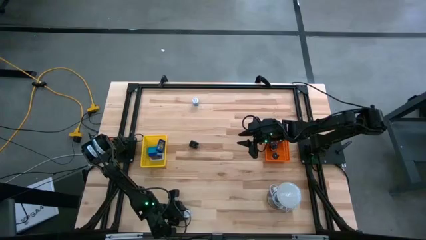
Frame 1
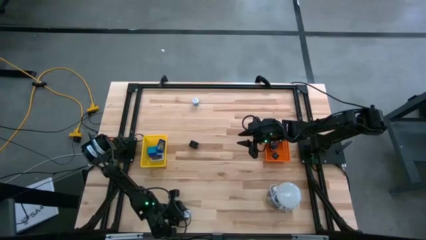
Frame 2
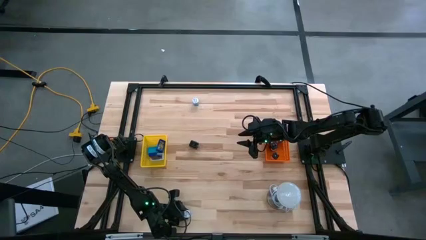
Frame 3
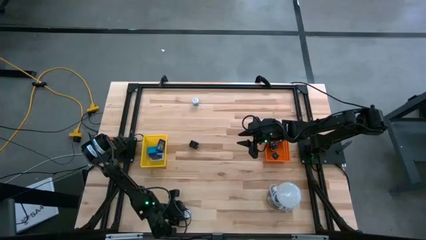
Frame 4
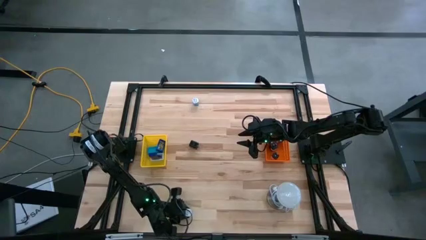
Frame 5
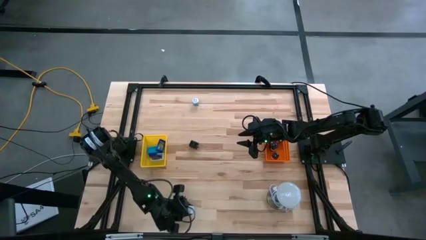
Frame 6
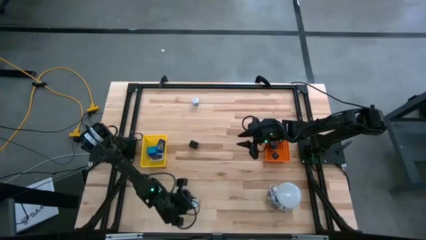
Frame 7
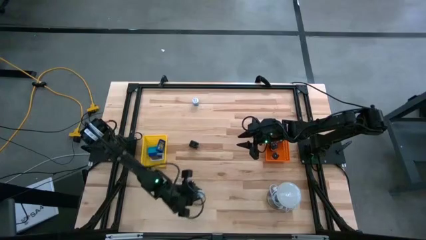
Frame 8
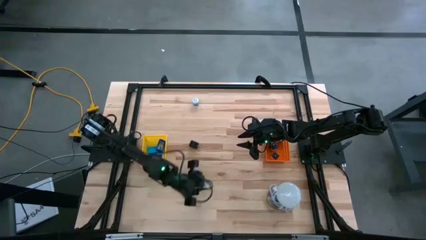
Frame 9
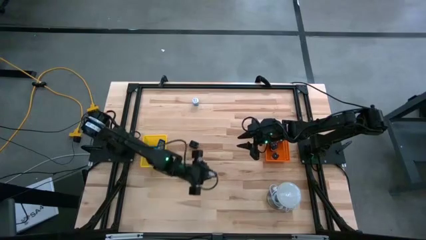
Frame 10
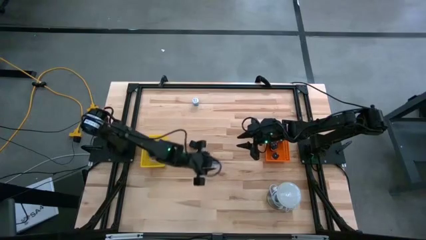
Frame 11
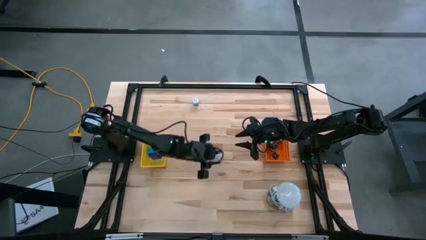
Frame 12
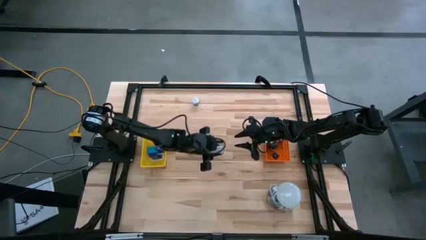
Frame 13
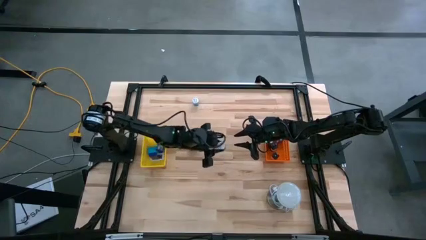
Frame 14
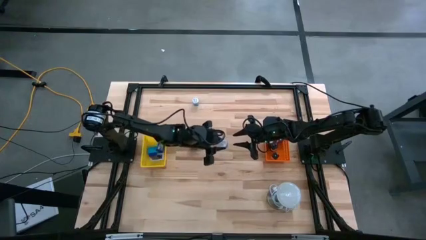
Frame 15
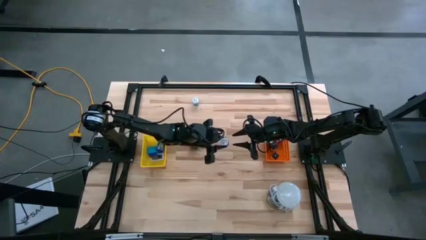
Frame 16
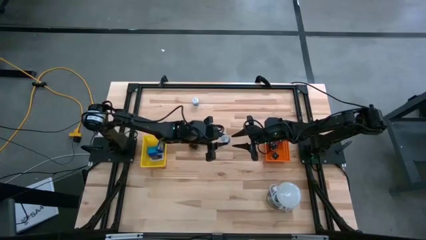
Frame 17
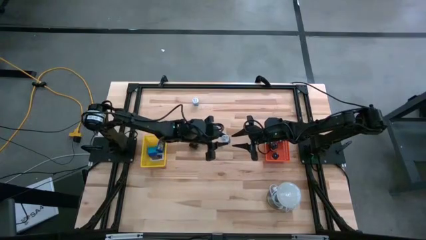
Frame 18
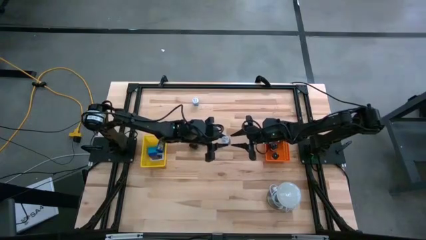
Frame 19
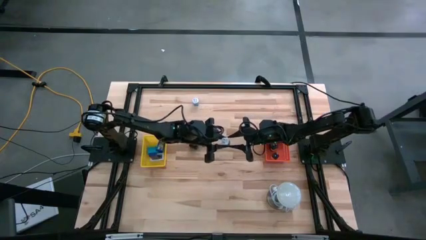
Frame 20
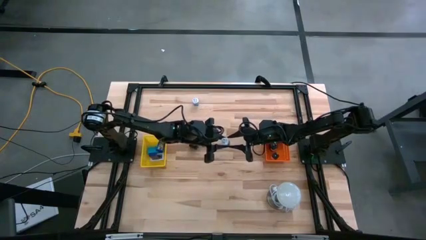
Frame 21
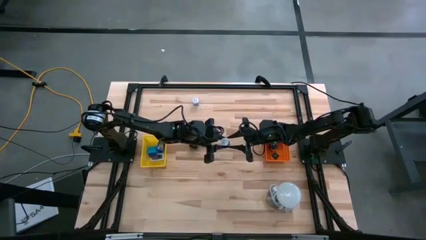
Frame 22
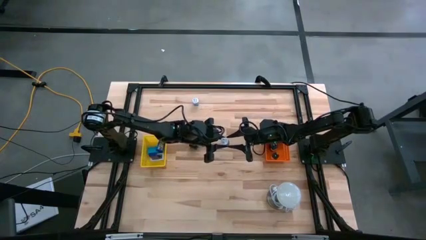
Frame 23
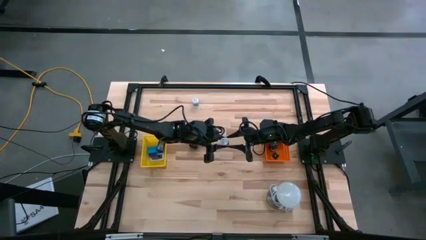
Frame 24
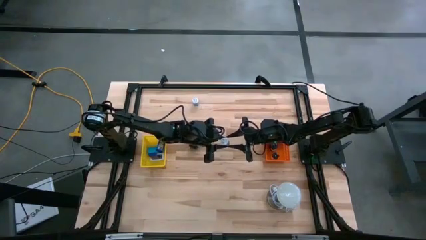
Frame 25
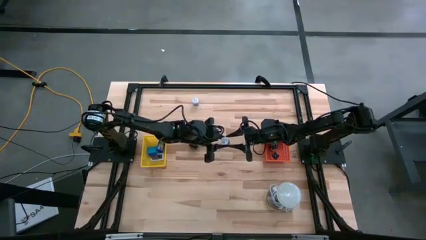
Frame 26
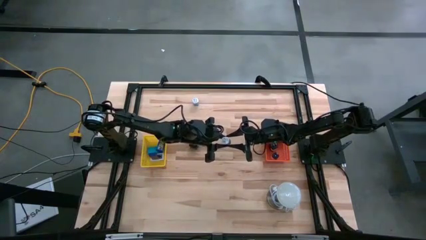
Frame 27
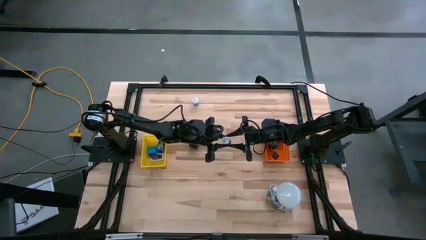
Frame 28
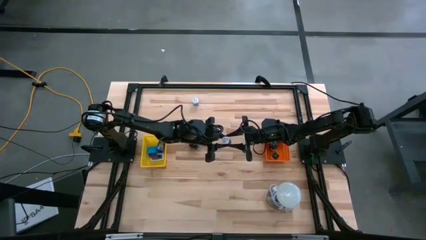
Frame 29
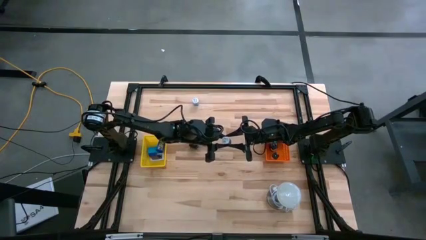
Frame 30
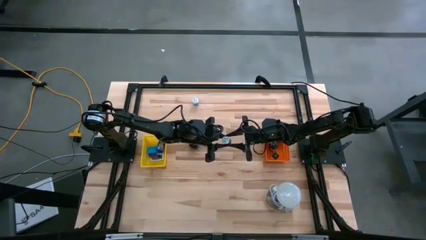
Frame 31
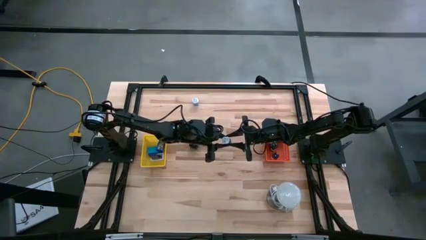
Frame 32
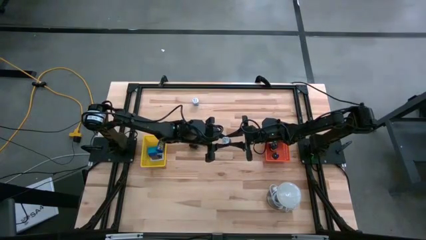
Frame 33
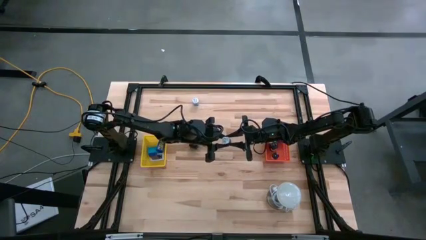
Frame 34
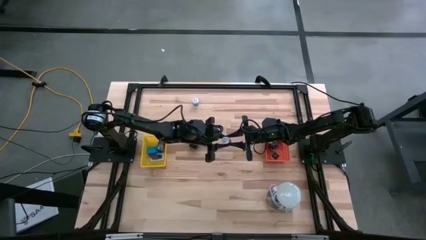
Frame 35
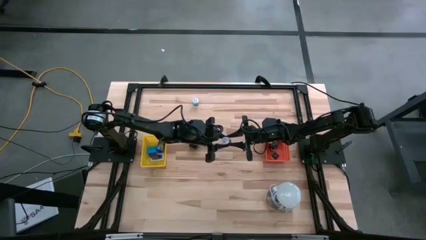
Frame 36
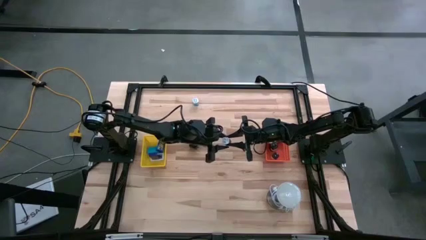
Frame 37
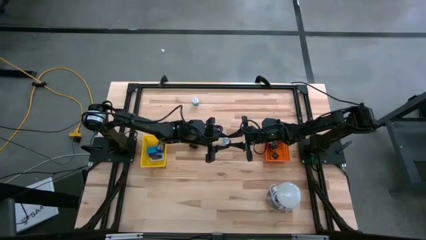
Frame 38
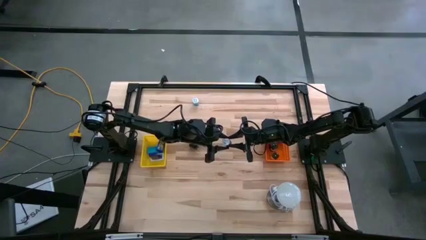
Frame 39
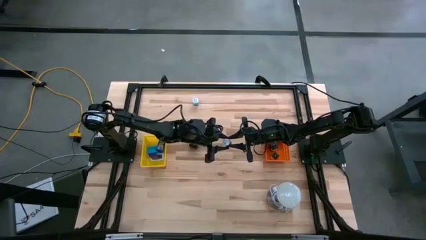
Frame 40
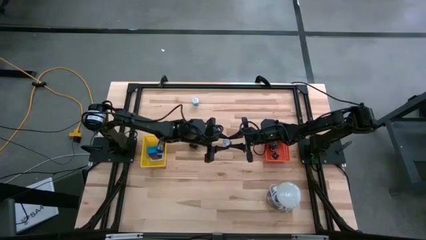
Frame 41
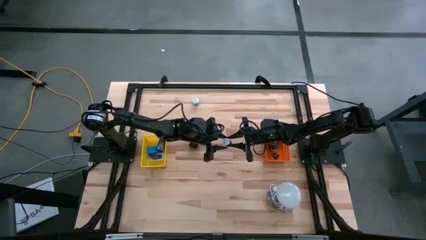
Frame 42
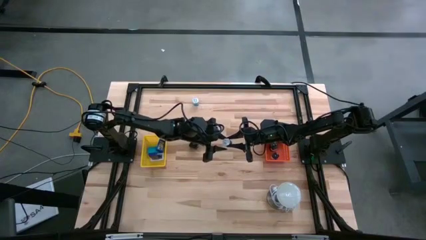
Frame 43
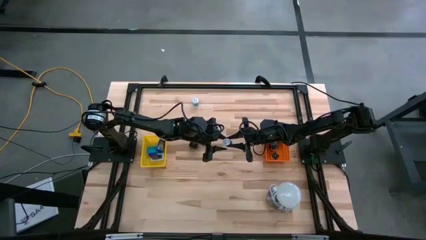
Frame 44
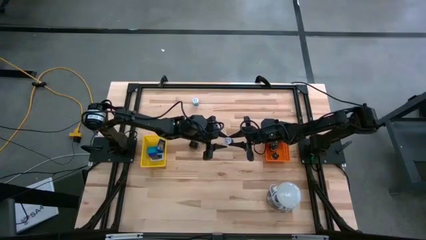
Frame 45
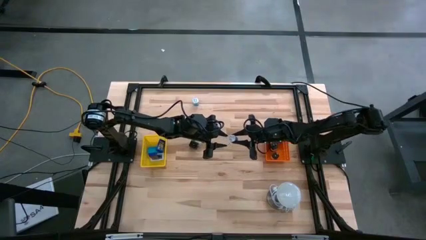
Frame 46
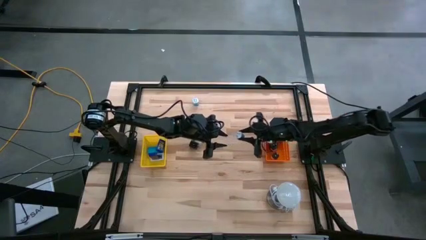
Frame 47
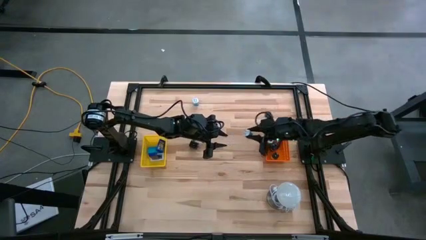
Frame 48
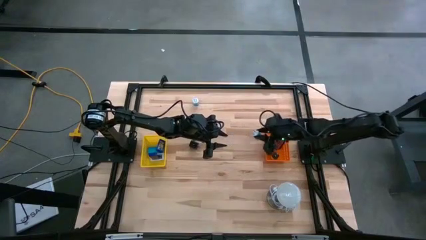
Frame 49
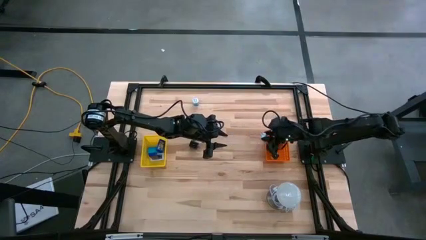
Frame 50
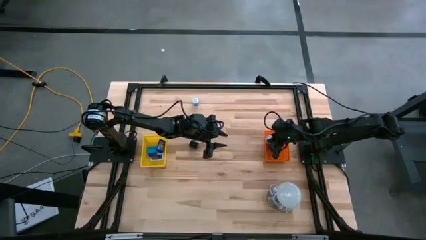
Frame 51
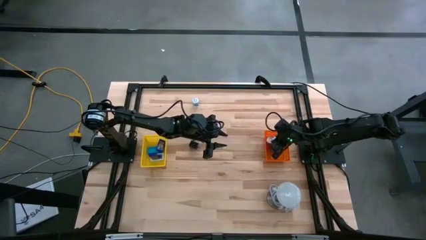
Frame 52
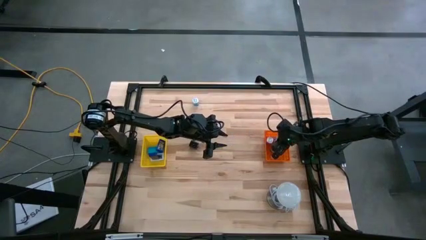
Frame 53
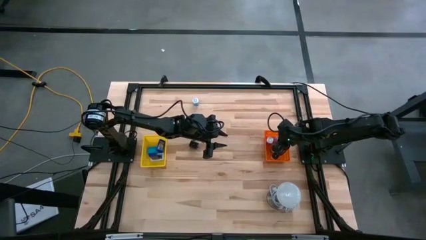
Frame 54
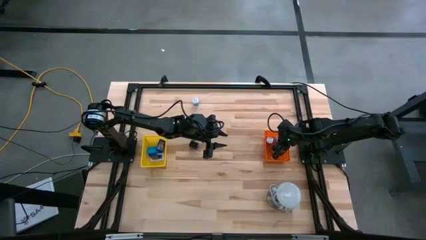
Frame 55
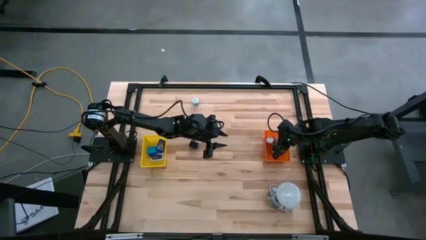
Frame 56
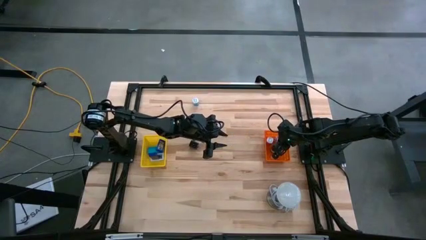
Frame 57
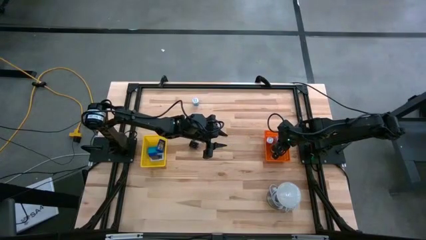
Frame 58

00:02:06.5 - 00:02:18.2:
Task: Pick & Place Office items
Put the bottom blue white charger adapter into the orange bin
